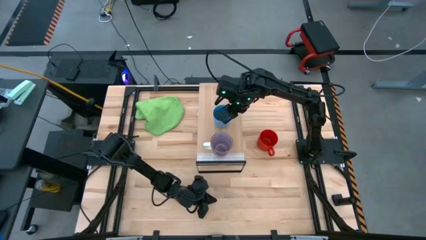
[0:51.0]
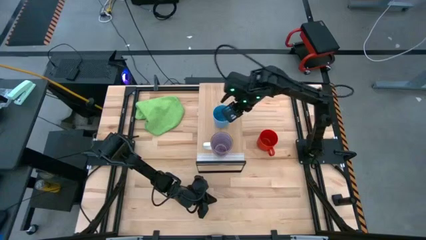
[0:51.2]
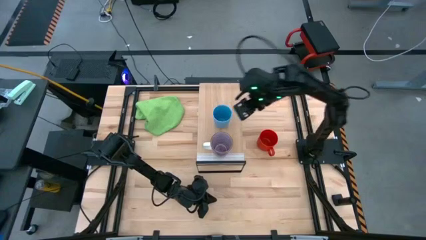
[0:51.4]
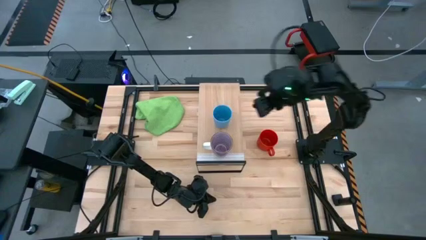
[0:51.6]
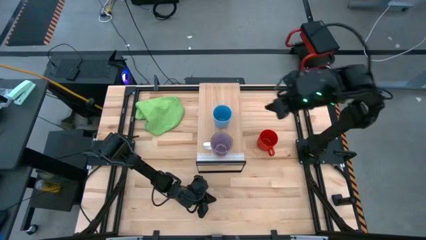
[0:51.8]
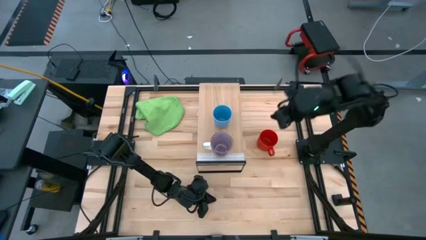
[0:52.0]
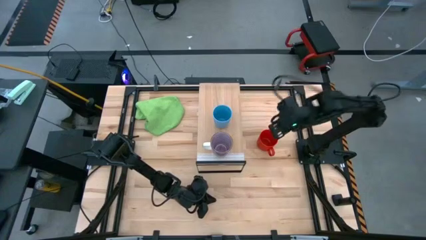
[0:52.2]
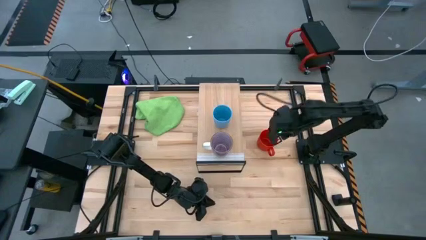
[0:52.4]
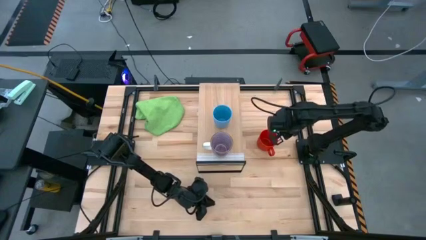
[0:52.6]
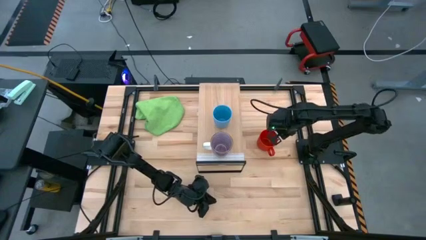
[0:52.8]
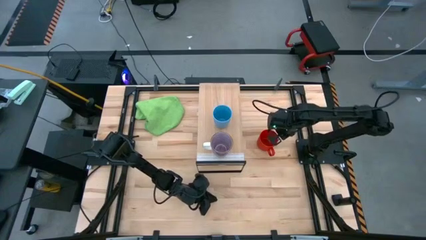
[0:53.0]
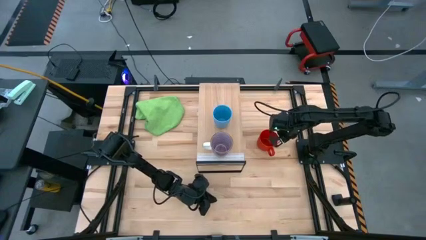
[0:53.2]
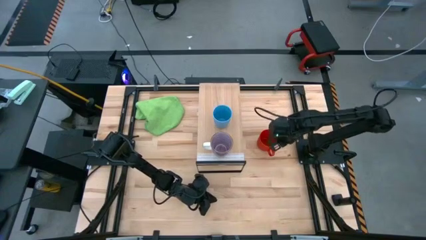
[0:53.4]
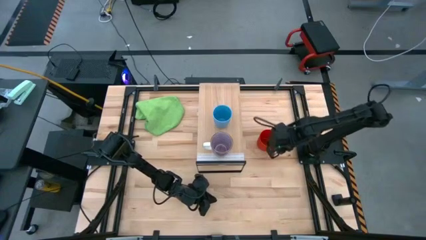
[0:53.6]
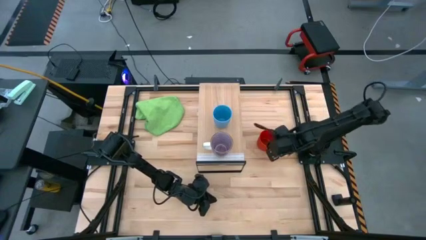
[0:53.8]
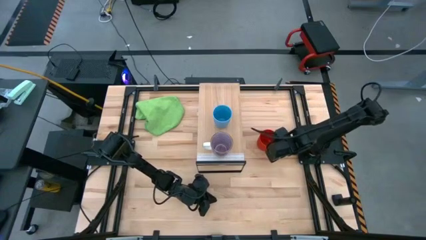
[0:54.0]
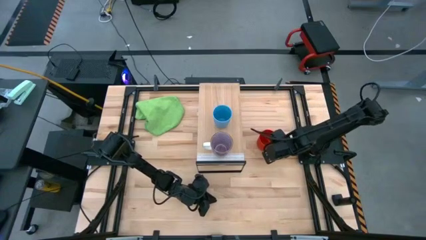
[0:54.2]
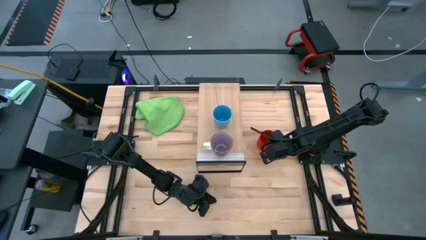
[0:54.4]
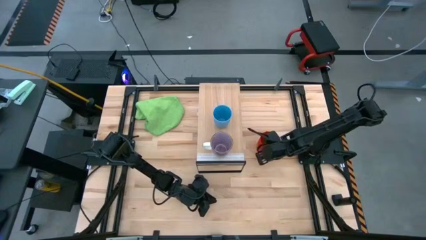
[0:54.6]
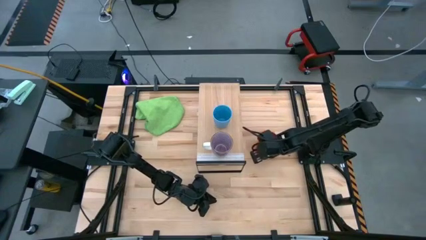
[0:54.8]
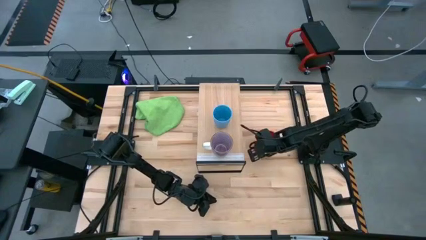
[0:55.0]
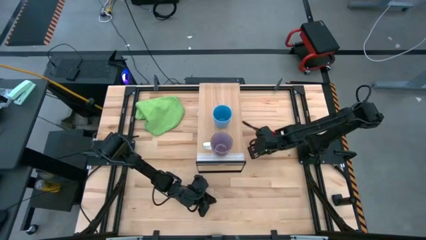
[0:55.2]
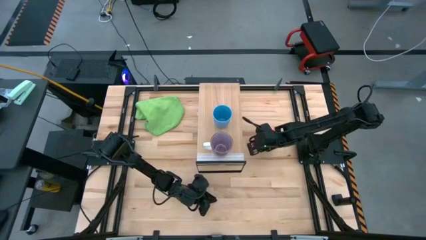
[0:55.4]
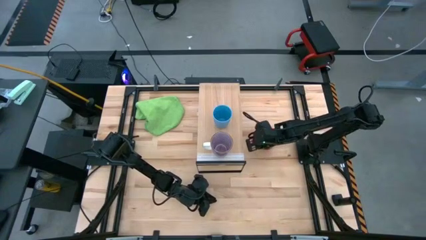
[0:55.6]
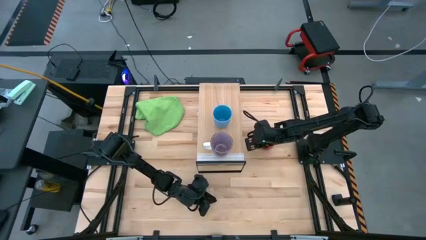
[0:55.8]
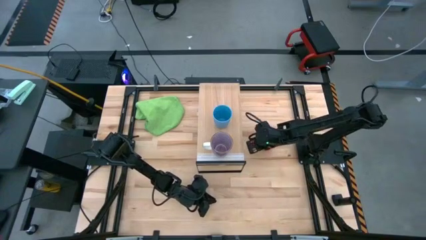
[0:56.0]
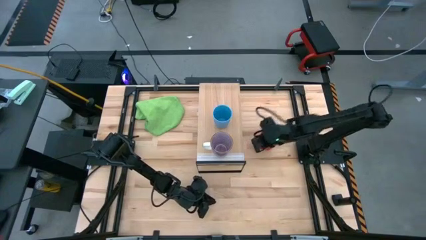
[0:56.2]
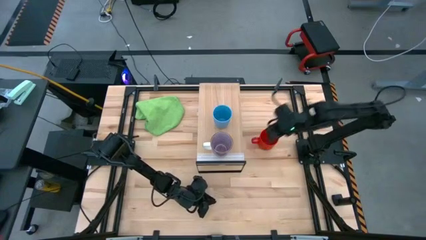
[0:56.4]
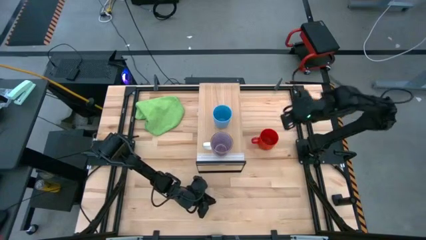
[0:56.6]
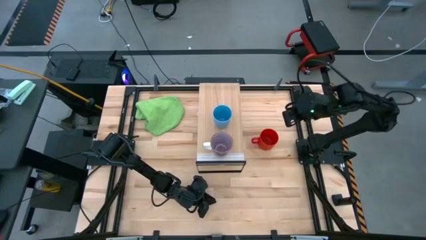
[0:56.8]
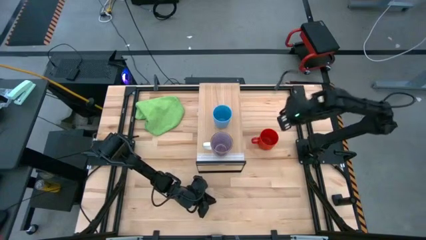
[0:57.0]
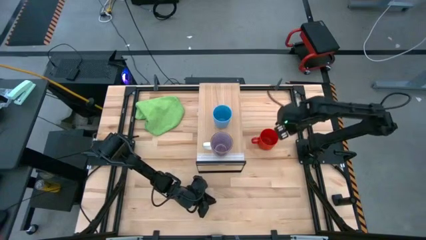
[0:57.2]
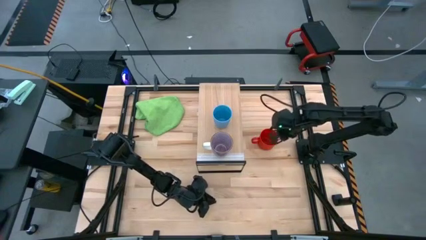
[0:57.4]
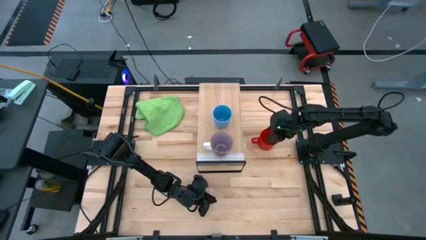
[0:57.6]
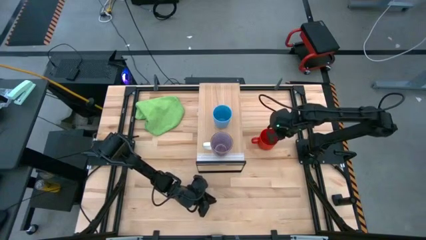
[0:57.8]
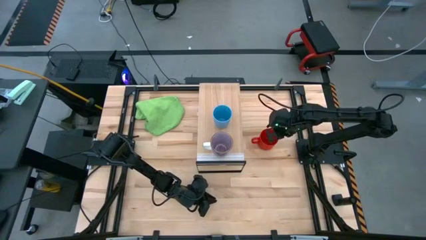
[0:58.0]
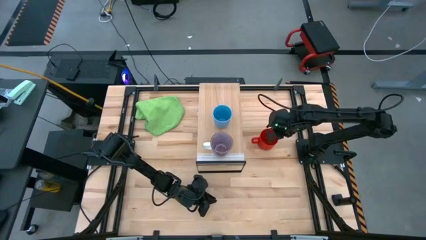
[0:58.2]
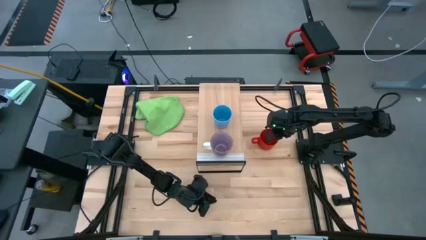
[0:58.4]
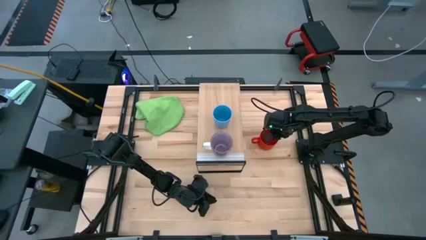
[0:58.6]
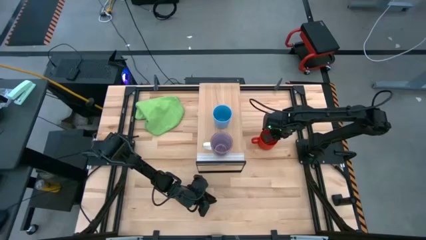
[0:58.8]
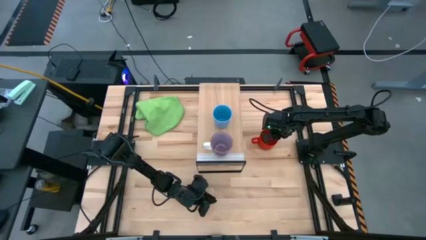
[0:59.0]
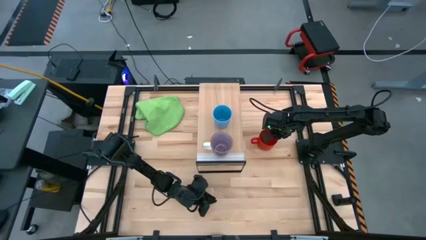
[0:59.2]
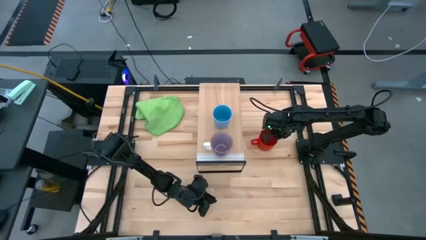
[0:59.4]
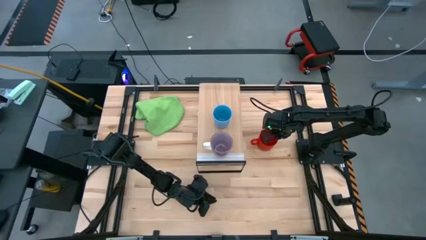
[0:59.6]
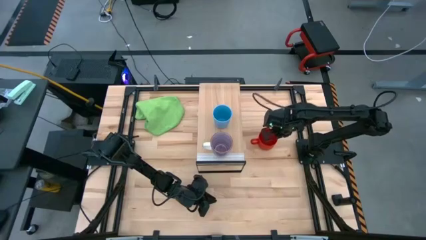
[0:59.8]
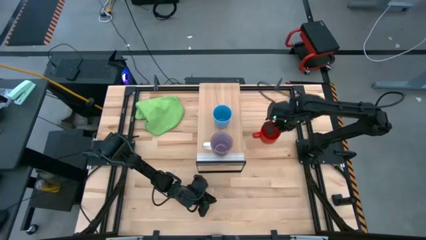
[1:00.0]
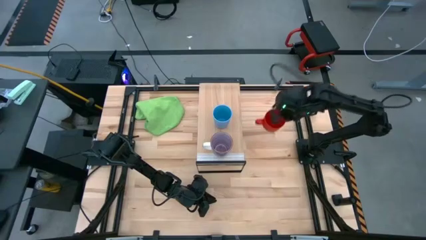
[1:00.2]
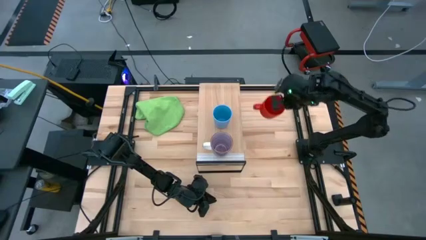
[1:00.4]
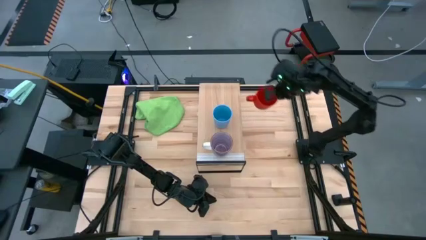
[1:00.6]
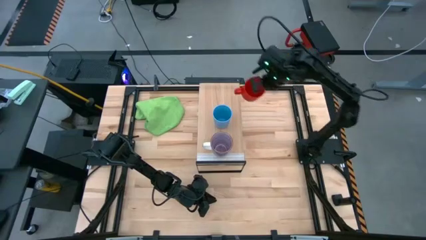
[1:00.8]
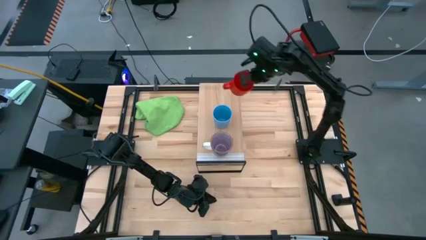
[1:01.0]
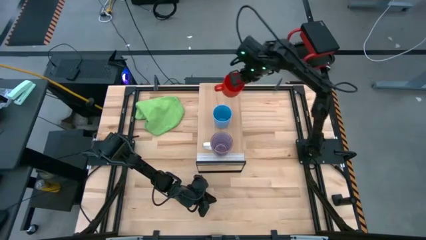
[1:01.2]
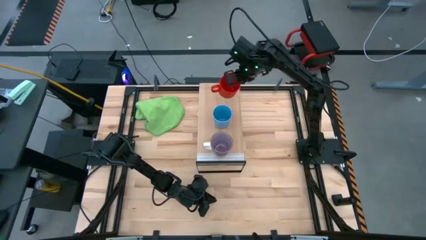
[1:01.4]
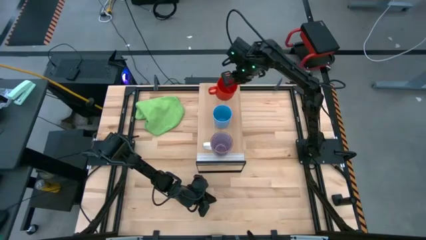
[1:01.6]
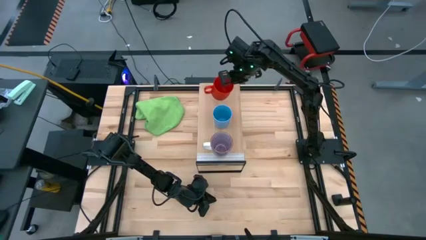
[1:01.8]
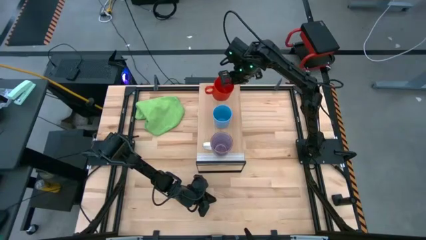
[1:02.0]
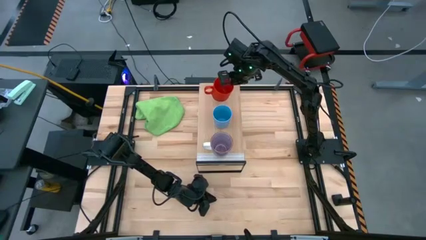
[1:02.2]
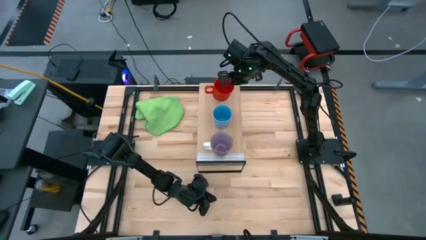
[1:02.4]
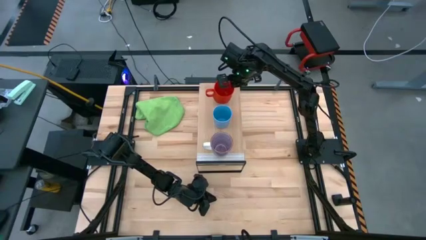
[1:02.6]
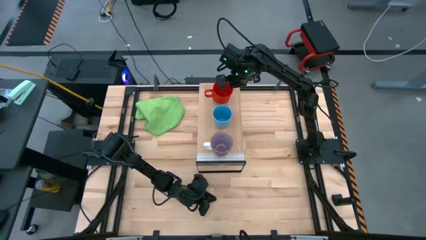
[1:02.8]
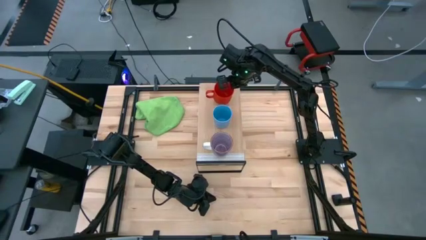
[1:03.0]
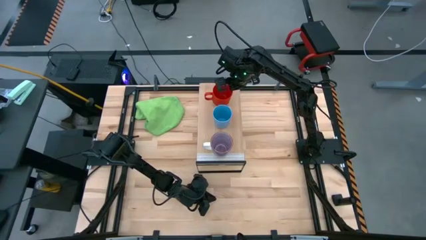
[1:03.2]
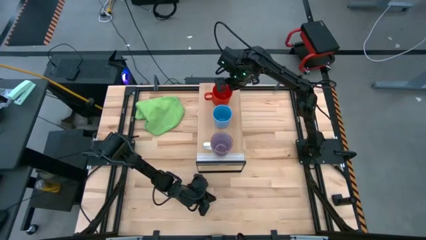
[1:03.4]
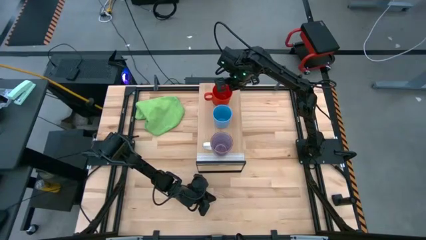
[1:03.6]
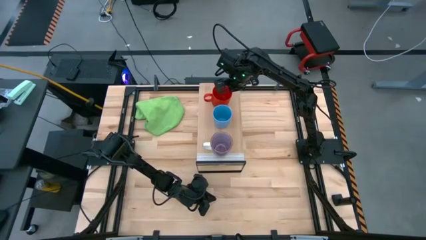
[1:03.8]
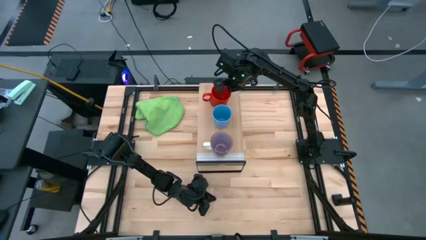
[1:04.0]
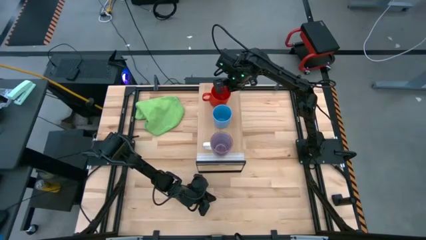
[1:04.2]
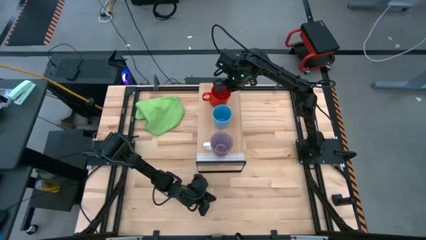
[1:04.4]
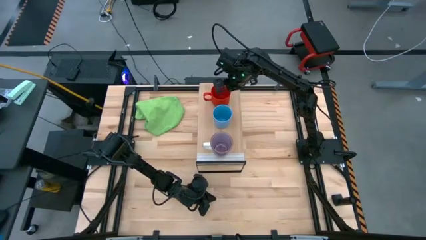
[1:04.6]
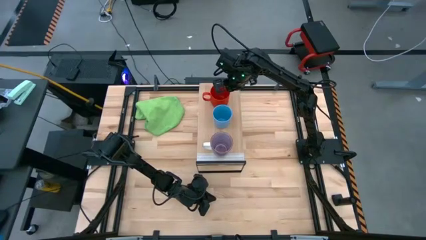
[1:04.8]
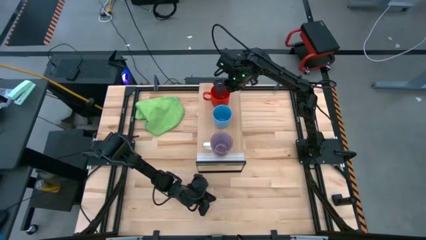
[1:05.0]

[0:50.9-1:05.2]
Task: Stack small to large cups/mugs on shelf
Put the red mug on the shelf
